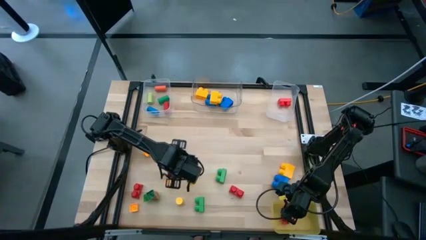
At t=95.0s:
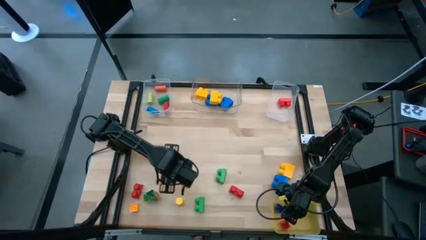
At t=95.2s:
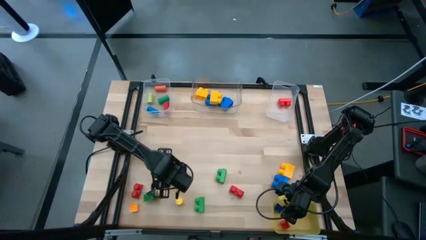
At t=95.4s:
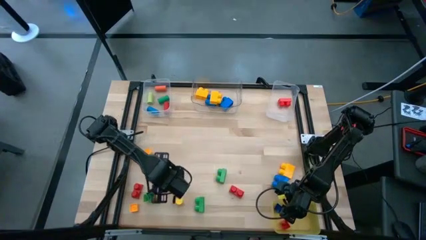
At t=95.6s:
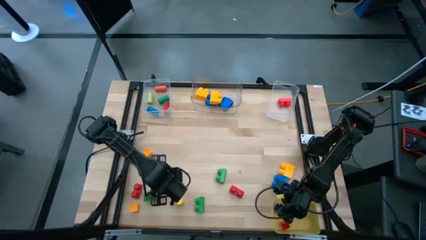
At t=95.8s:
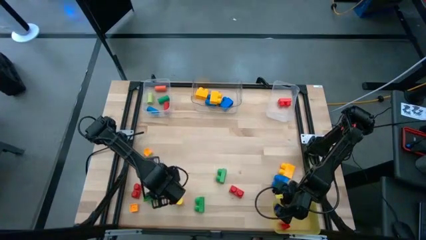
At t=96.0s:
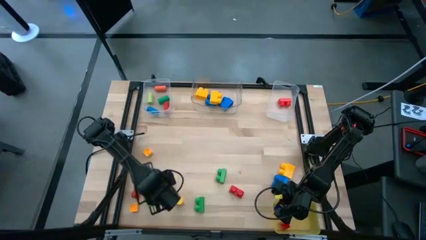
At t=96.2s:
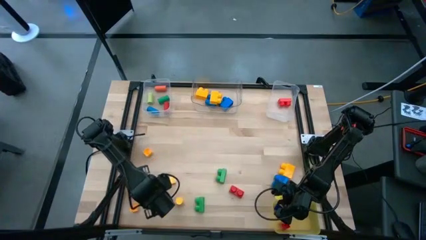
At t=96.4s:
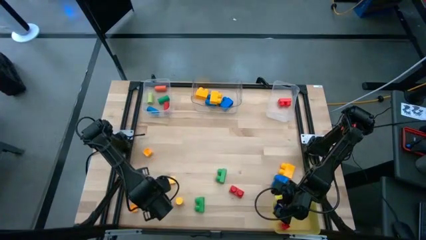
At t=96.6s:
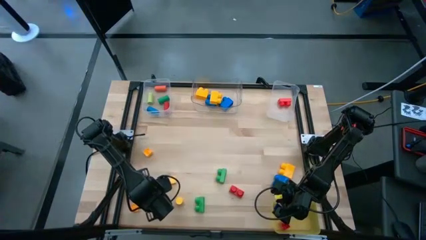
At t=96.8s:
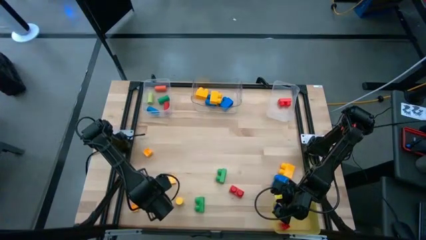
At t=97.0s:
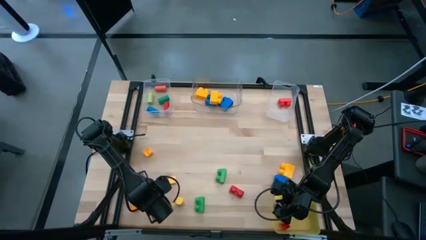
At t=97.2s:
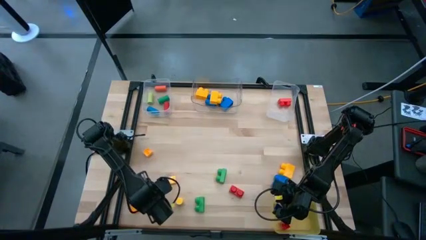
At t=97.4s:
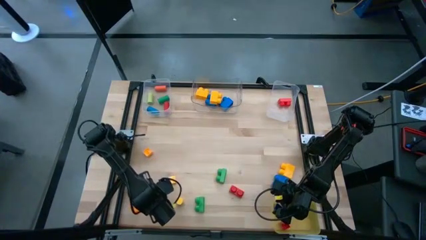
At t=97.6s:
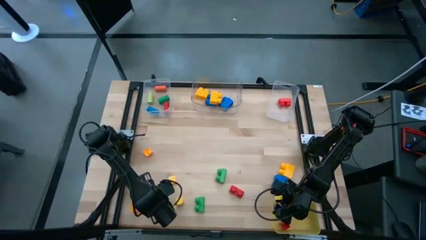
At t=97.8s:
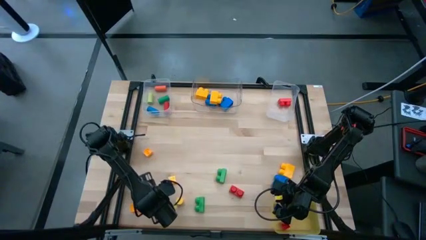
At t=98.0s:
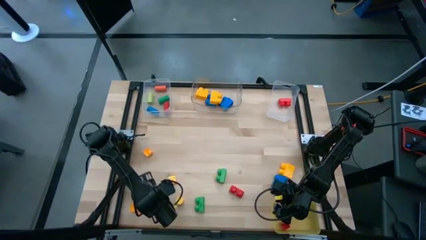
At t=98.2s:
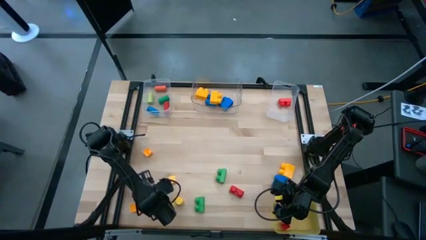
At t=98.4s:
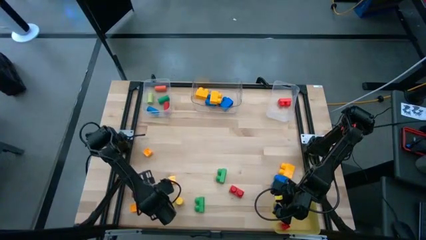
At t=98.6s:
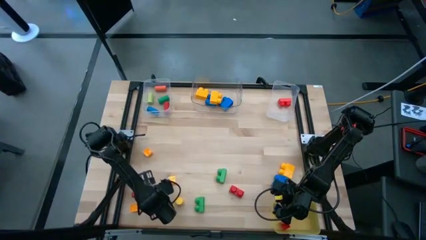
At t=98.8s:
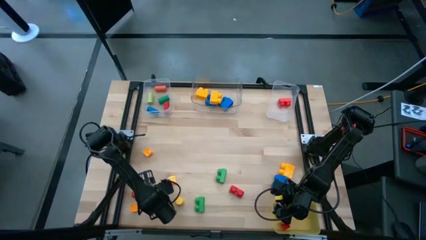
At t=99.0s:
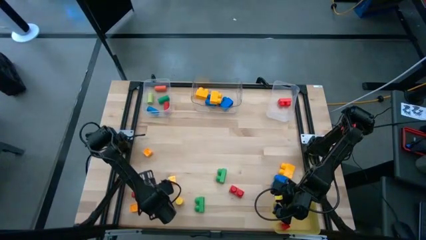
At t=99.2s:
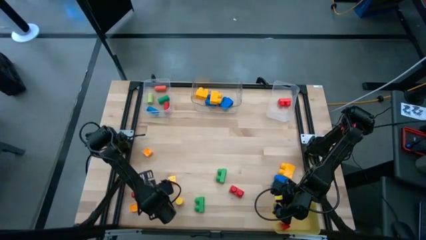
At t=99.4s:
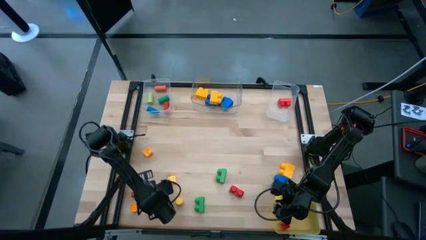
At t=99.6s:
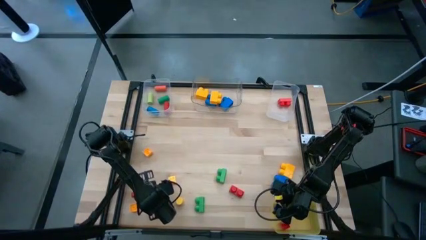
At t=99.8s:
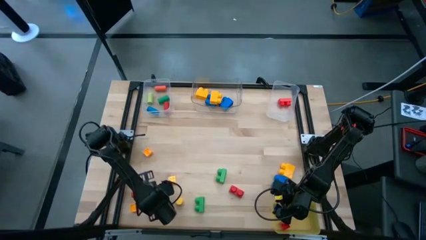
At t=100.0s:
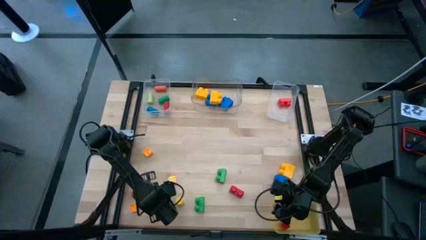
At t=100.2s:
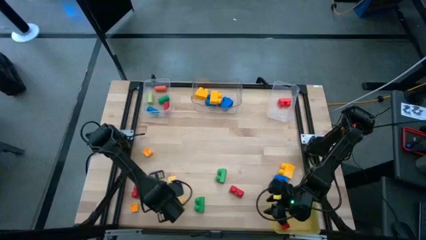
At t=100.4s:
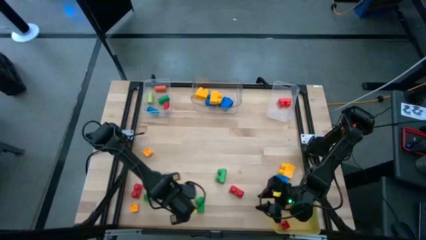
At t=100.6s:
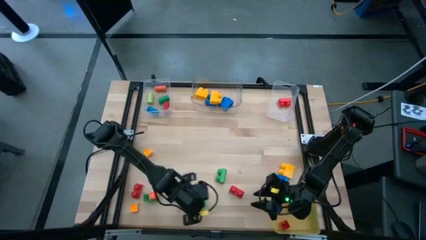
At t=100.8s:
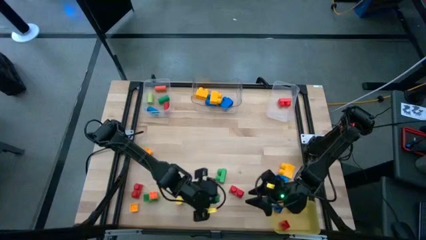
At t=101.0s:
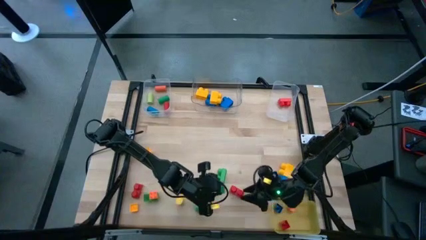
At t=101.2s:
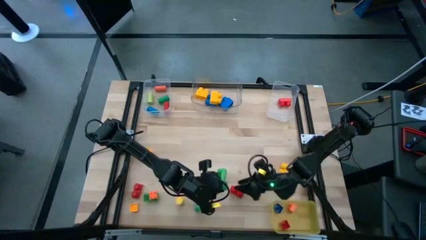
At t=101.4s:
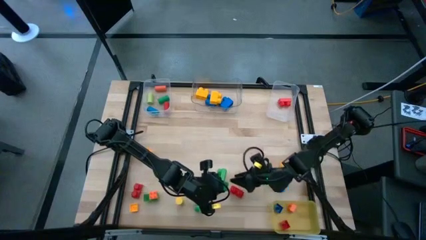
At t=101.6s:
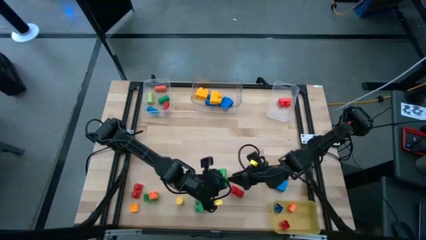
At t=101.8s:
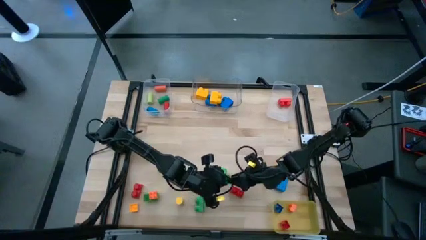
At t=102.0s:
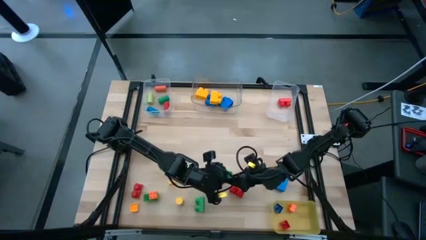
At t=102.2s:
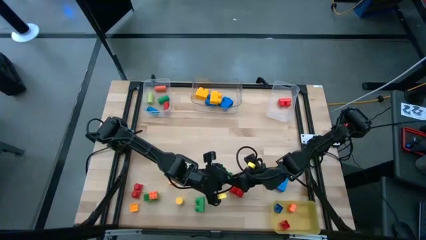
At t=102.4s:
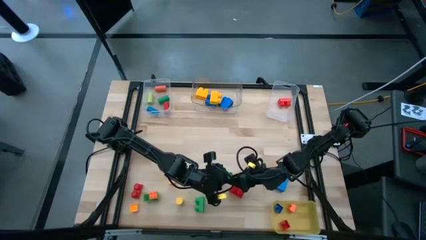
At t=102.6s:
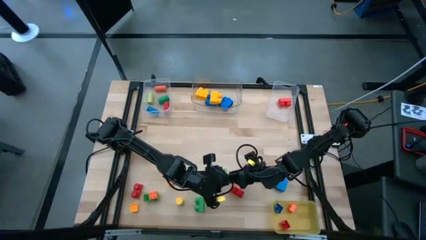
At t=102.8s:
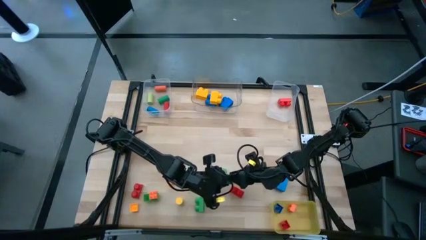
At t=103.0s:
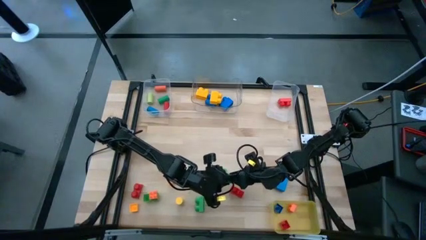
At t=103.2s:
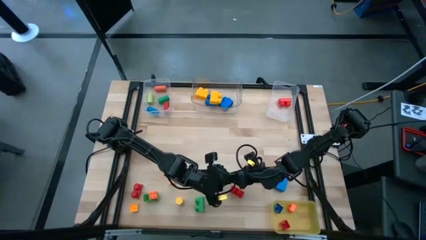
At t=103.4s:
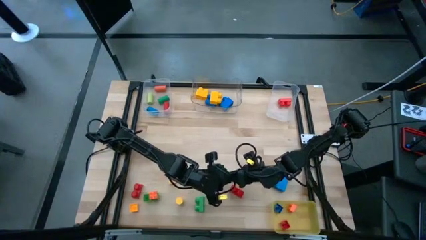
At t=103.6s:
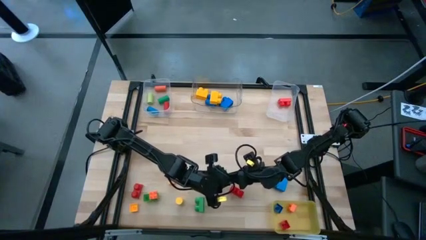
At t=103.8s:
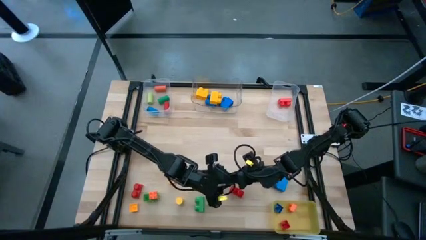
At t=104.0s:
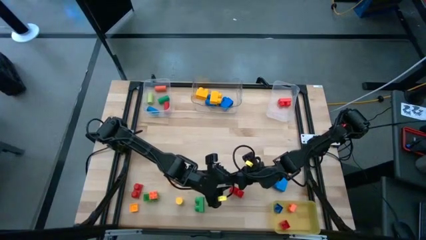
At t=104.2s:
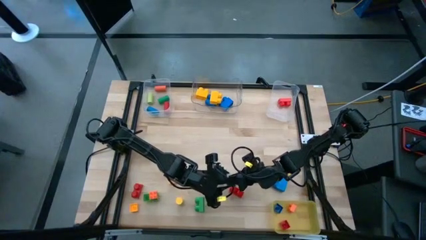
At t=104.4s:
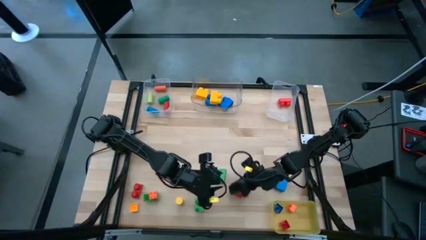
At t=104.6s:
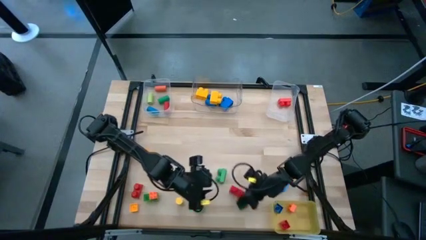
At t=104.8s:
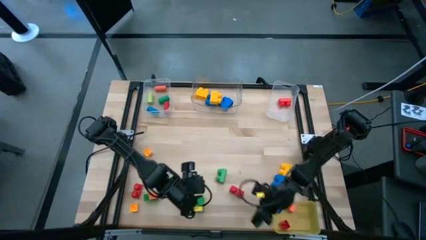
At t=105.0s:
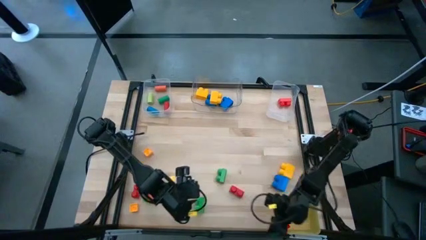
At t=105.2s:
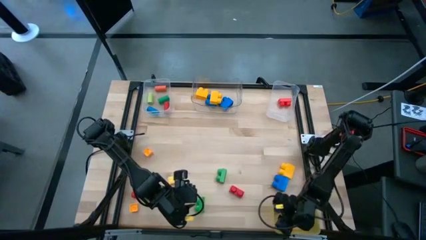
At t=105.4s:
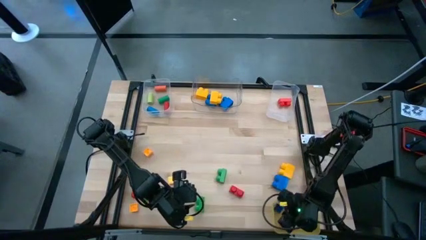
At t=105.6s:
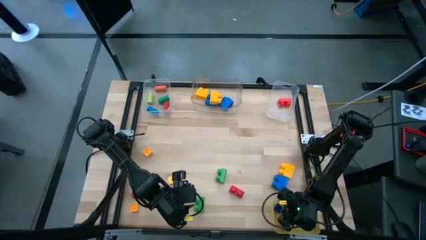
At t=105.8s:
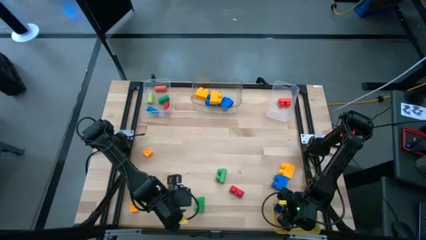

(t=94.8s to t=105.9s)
Task: Sort blocks by size
Put the small green game piece into the yellow bin

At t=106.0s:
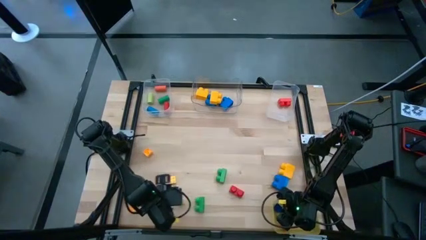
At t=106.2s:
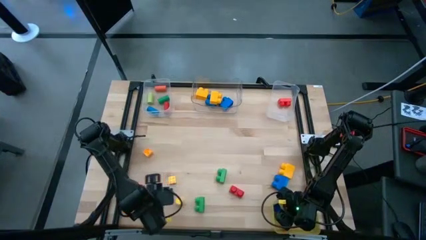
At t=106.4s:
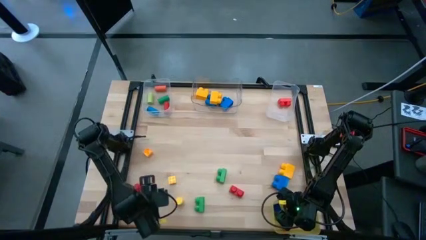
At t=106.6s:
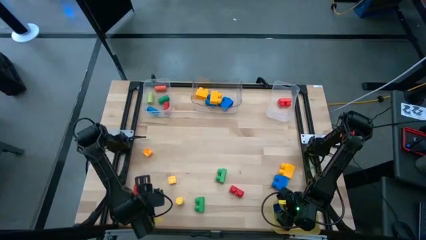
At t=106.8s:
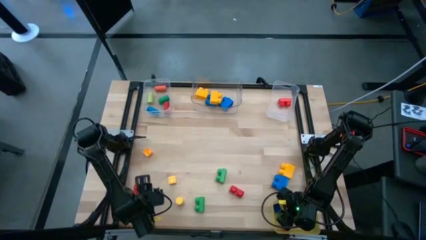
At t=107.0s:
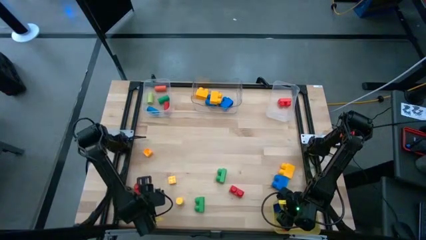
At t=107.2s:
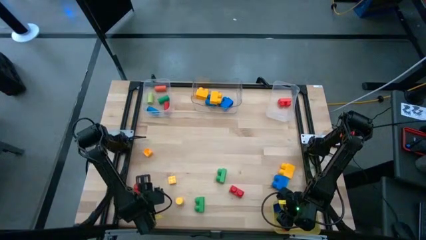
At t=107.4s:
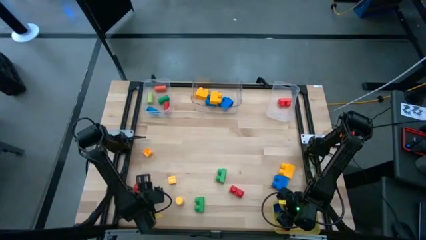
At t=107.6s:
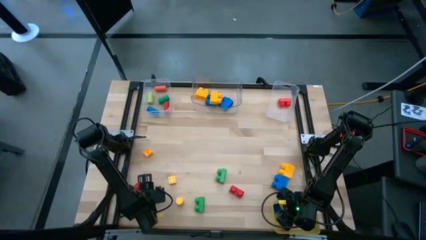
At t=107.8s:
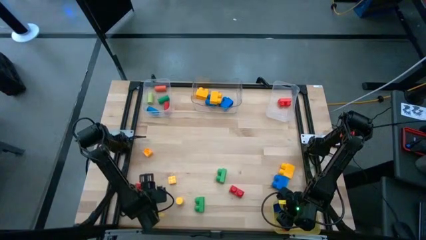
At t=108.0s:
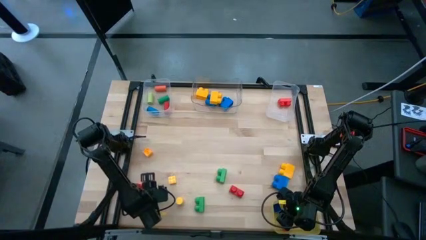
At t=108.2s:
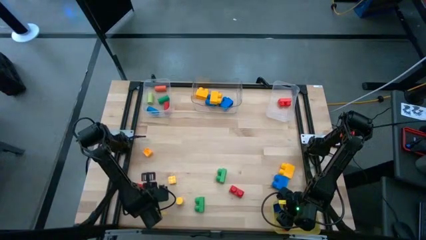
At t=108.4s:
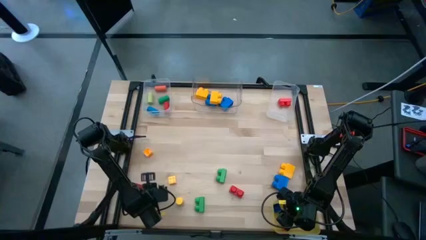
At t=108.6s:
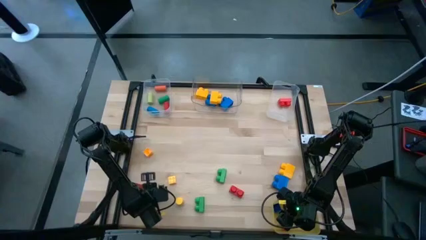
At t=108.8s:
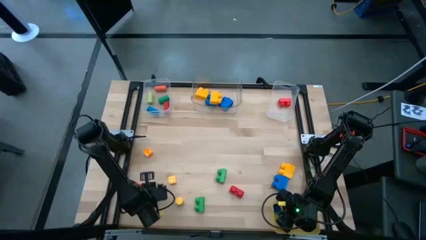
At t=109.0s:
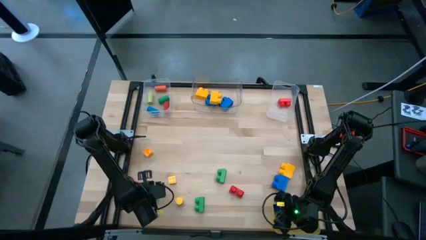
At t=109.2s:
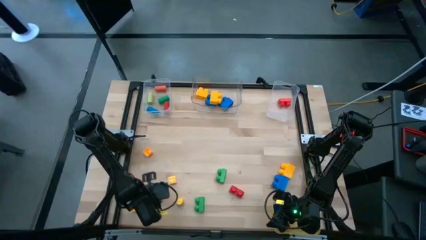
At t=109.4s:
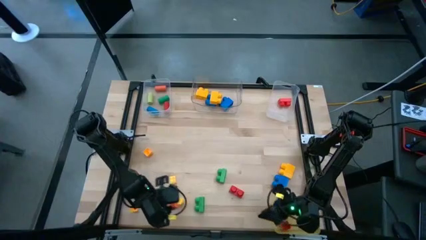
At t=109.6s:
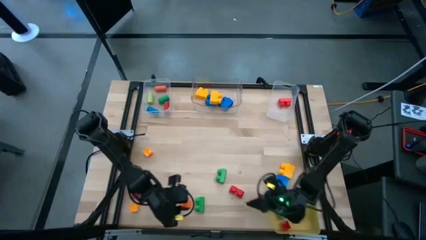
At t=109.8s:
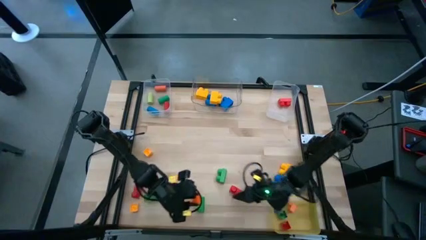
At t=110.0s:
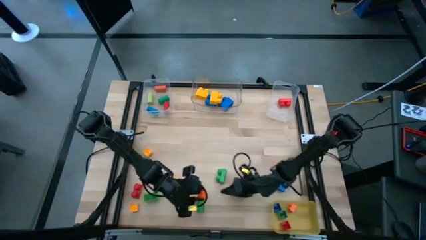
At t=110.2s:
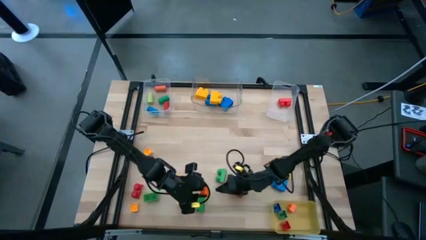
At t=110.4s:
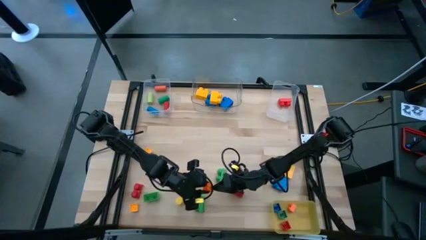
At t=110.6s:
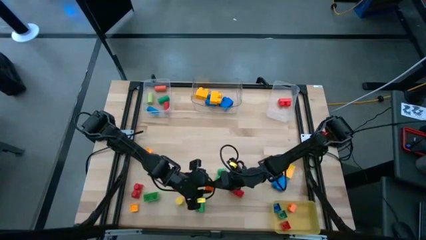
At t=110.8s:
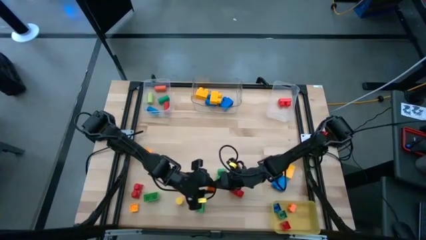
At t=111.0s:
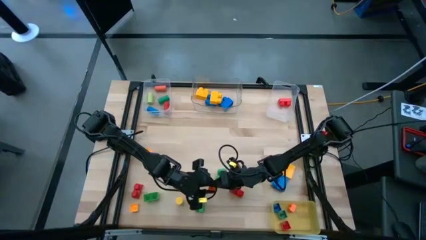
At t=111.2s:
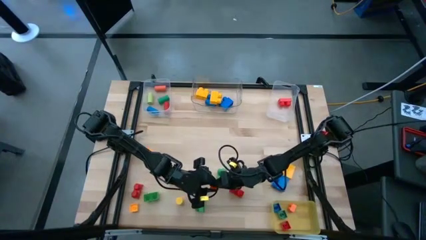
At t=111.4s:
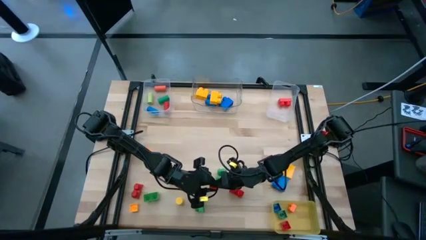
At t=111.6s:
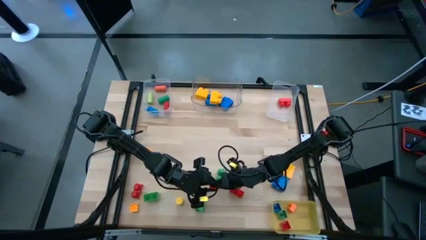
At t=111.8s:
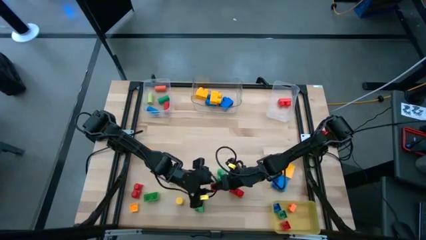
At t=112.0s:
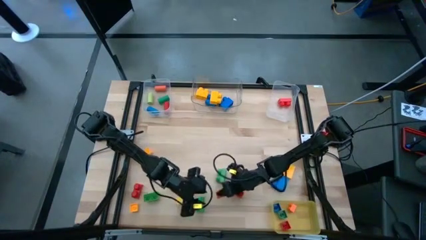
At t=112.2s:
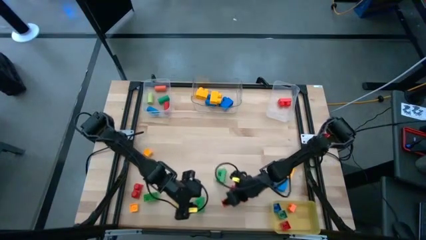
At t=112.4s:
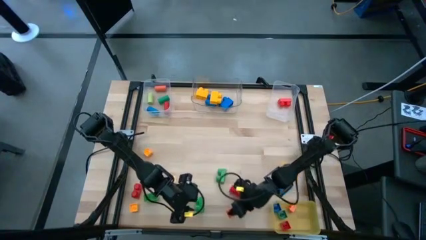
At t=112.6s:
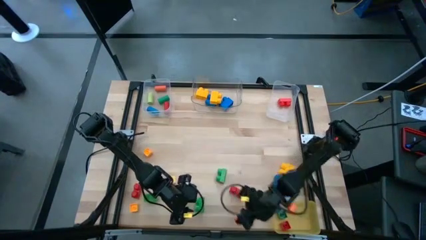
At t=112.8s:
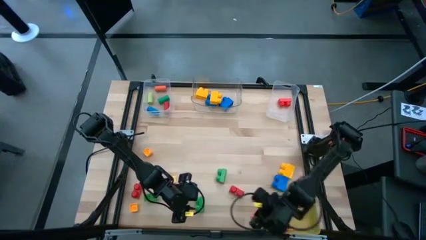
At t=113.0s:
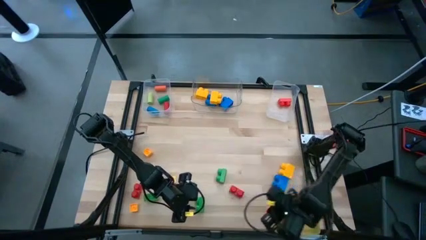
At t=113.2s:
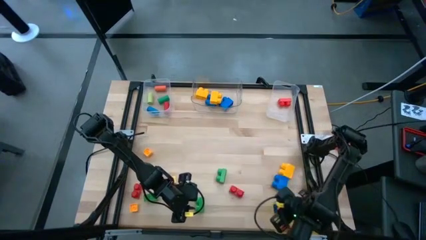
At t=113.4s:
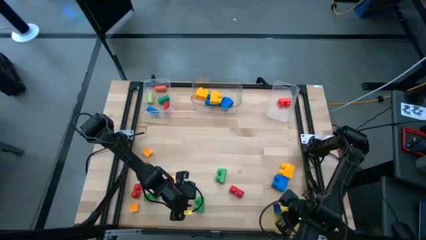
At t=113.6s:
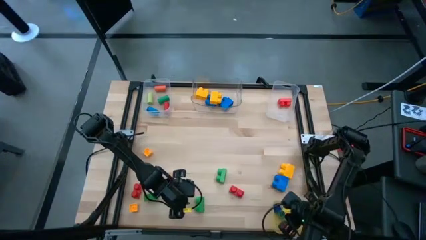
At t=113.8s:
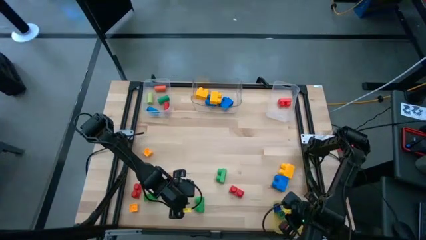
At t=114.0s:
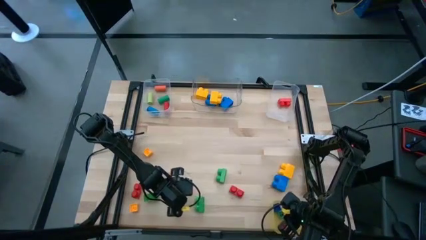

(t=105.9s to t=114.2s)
Put the small orange game piece into the yellow bin
